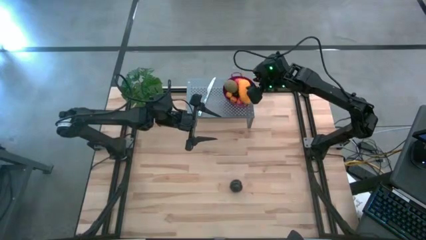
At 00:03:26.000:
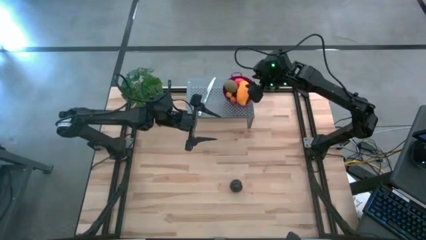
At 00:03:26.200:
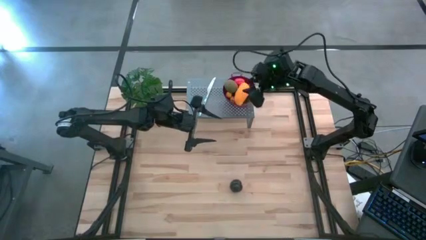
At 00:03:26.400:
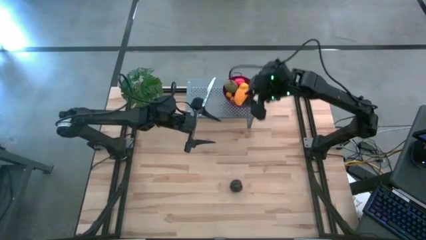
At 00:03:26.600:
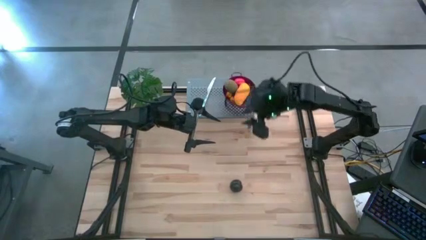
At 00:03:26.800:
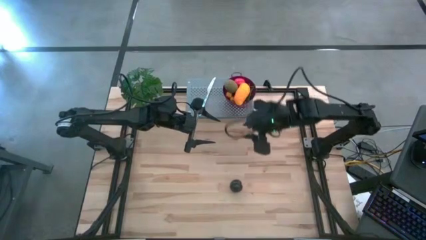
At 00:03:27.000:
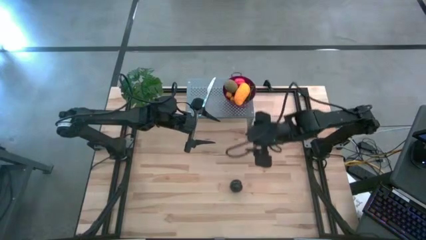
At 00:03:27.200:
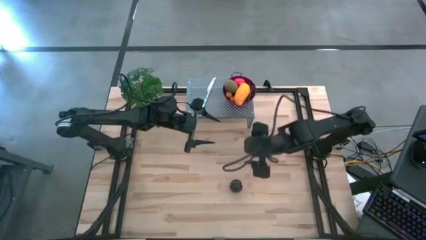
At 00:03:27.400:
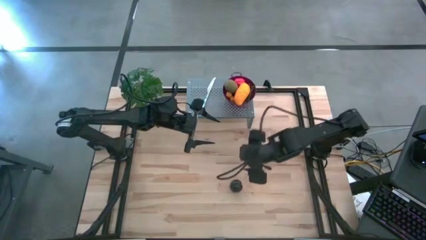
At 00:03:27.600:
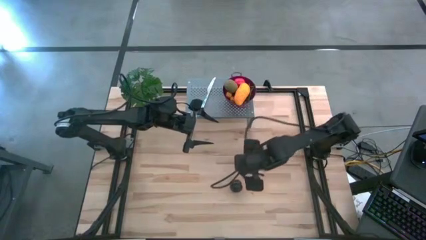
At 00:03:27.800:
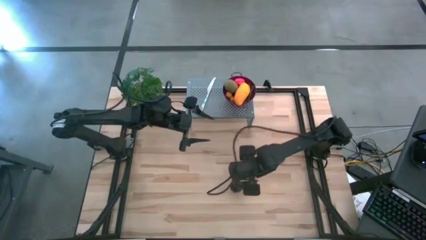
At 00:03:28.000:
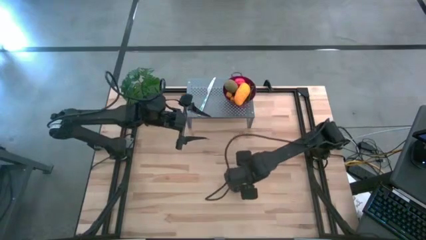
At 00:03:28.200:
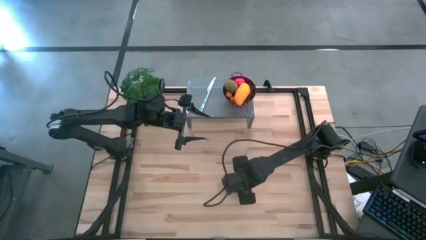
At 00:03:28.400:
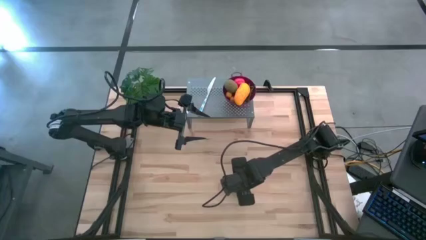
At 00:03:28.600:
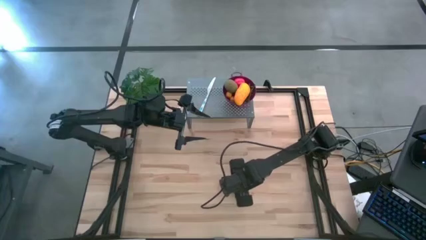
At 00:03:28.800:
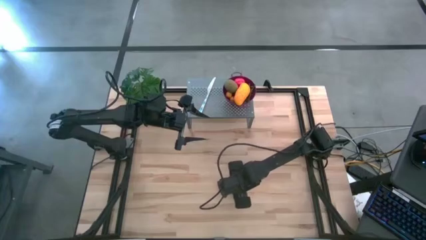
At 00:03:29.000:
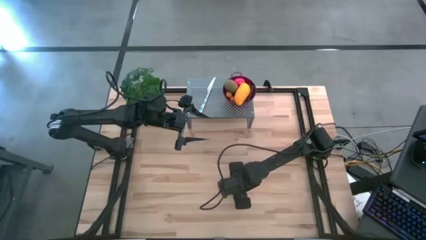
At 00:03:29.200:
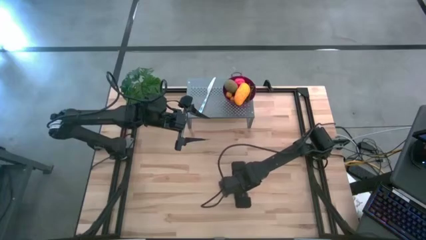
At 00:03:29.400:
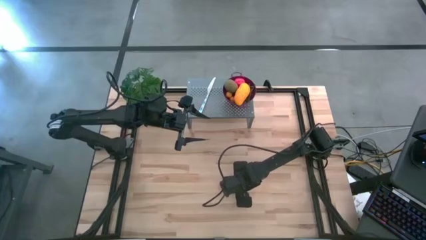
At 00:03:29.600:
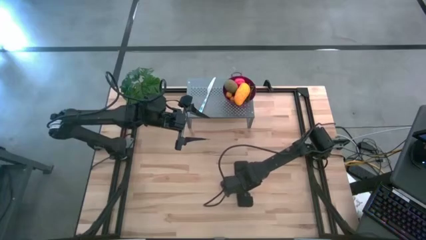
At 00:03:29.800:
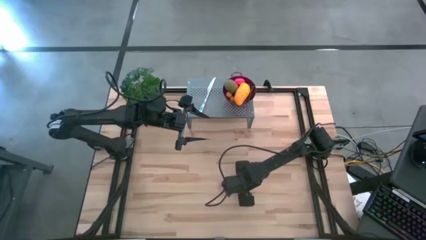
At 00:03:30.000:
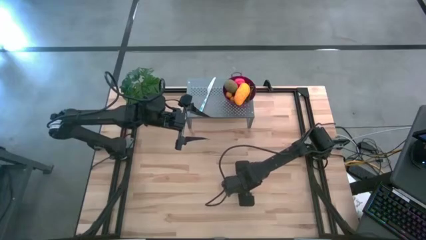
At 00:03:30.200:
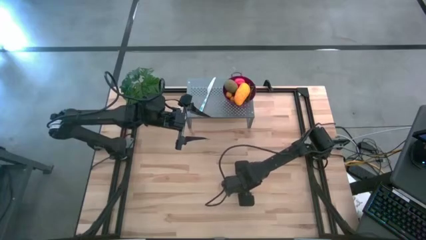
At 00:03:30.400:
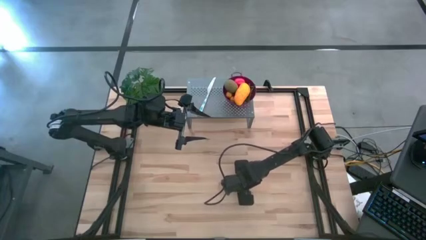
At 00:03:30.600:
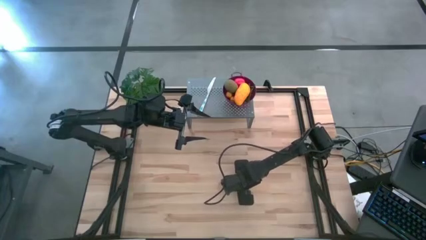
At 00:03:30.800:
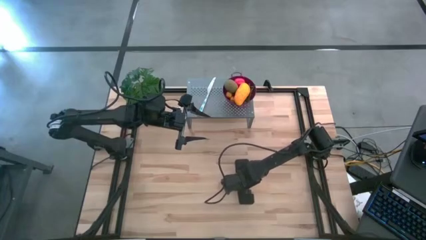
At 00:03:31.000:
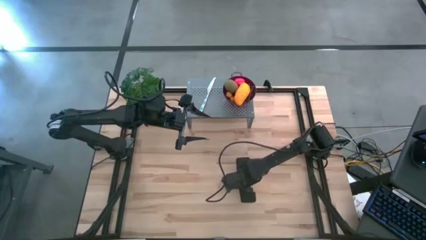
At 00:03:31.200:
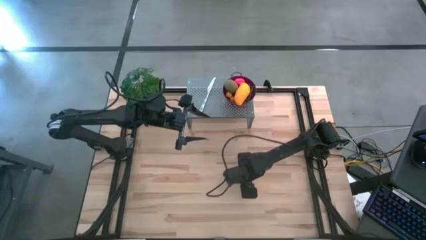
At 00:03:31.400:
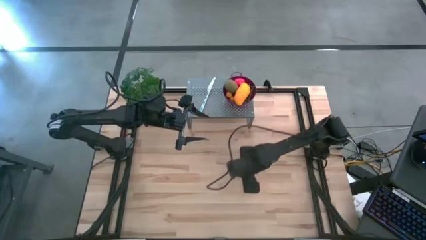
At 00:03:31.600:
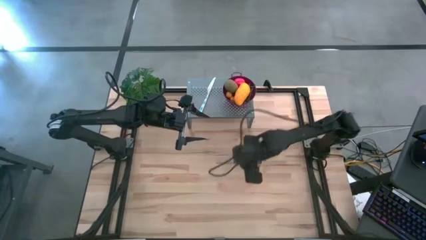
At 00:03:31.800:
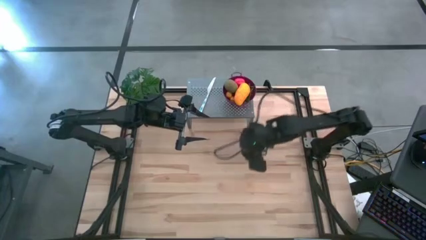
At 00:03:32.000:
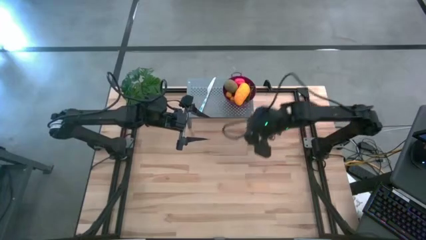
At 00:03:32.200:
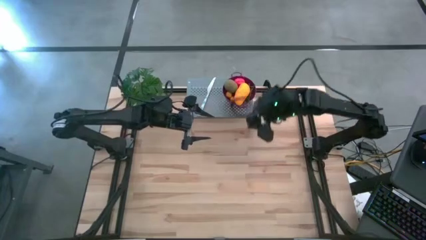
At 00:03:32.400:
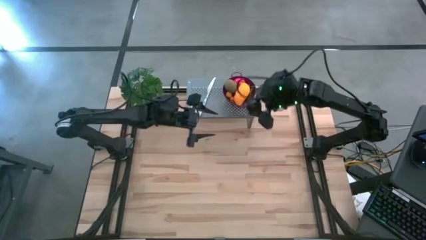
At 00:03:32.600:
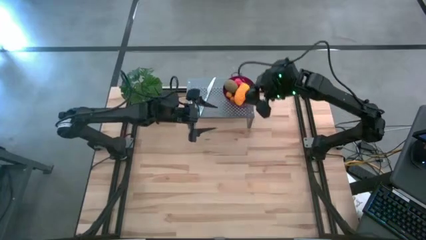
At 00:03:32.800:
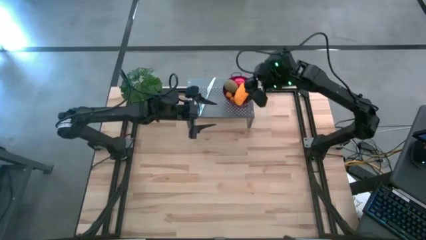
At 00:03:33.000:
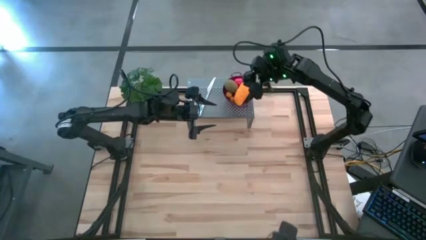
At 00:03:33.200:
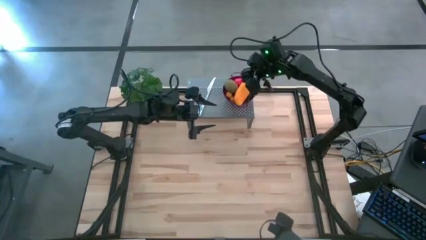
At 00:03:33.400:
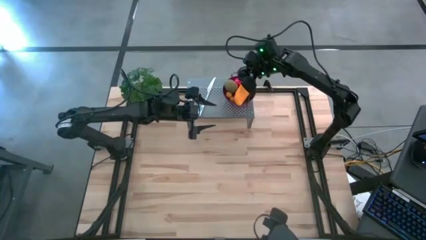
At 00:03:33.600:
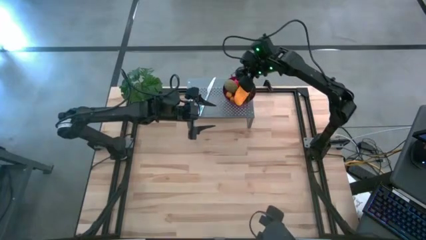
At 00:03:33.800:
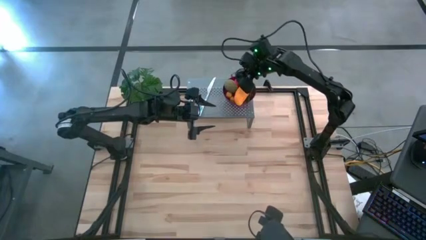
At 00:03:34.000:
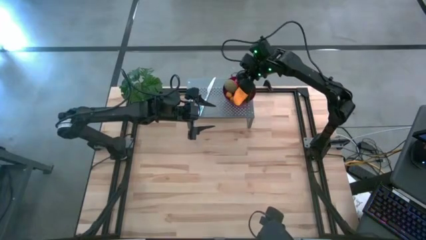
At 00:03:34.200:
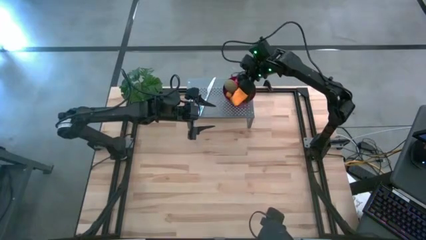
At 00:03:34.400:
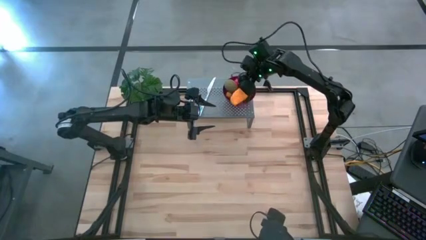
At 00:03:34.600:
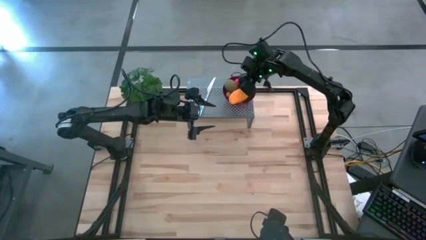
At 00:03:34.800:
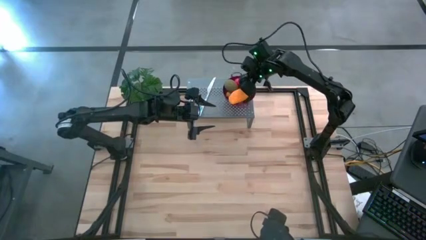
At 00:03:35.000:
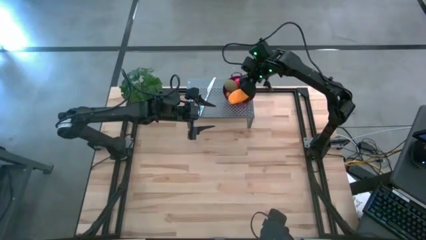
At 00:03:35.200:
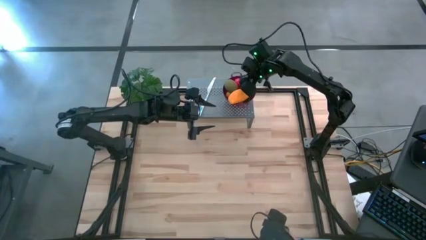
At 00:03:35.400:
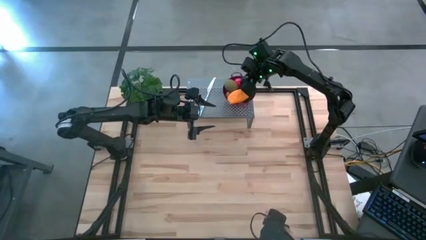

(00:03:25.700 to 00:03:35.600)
Task: Pick & Place Fruit
Put the black plum into the violet strainer bowl on the shelf

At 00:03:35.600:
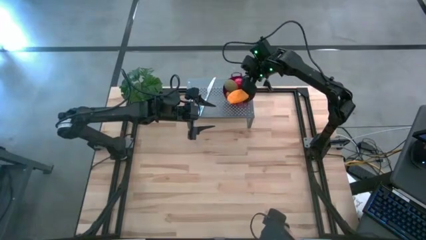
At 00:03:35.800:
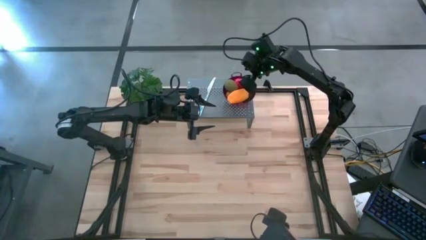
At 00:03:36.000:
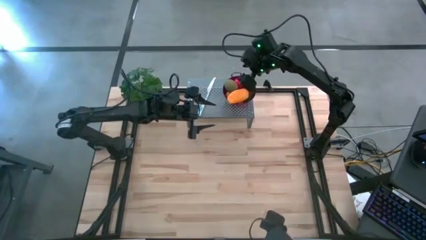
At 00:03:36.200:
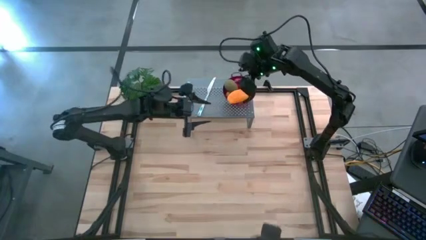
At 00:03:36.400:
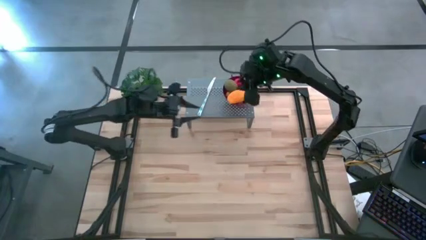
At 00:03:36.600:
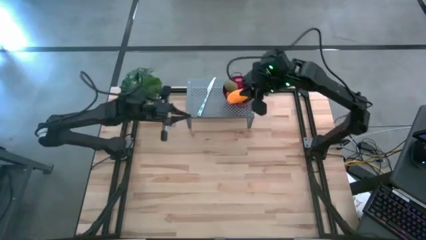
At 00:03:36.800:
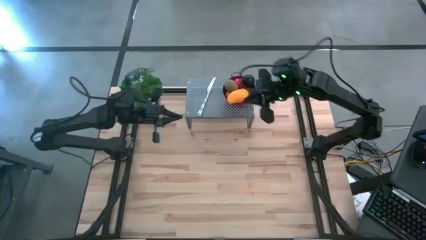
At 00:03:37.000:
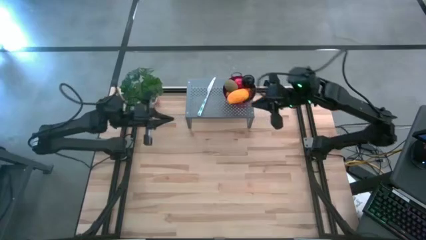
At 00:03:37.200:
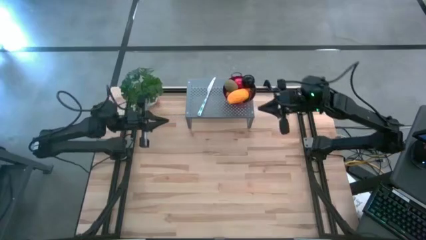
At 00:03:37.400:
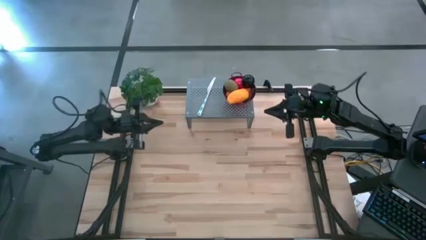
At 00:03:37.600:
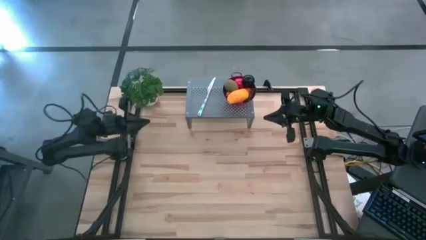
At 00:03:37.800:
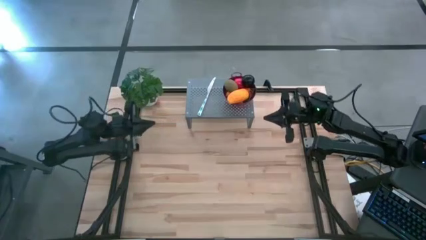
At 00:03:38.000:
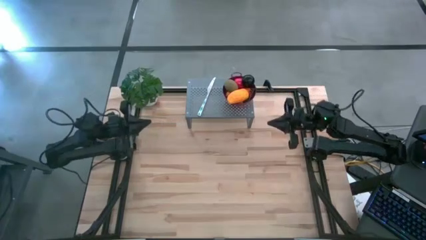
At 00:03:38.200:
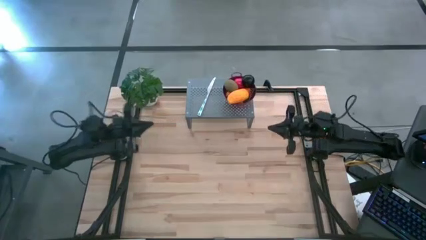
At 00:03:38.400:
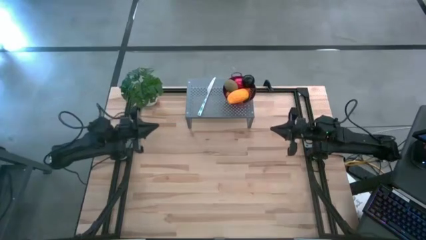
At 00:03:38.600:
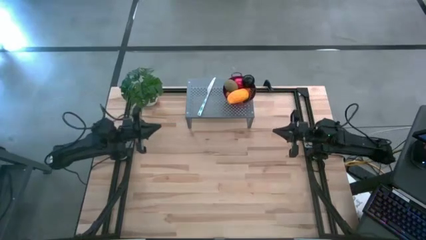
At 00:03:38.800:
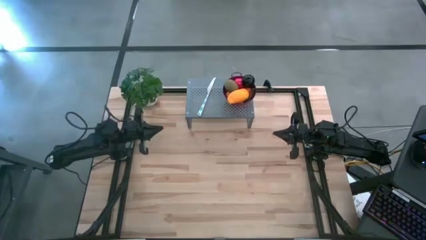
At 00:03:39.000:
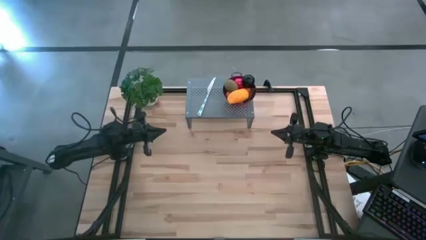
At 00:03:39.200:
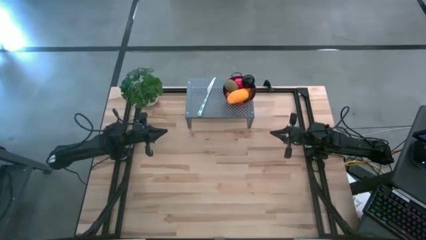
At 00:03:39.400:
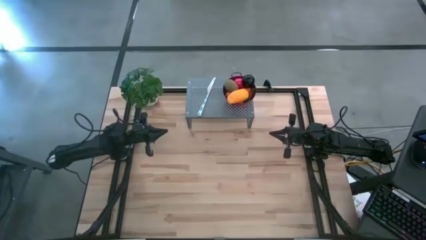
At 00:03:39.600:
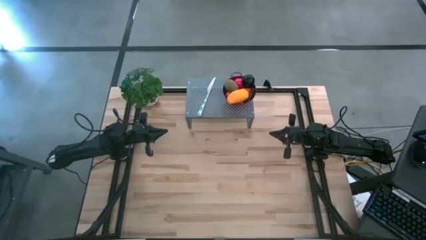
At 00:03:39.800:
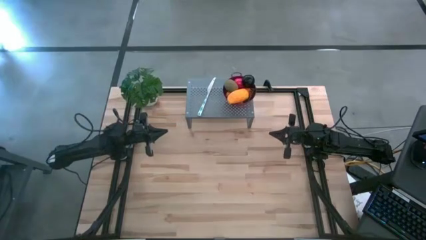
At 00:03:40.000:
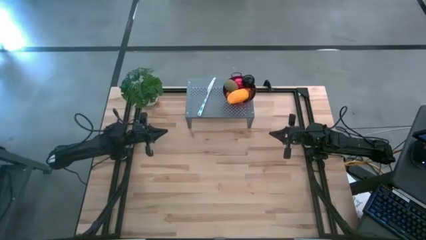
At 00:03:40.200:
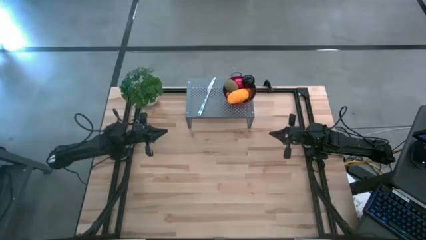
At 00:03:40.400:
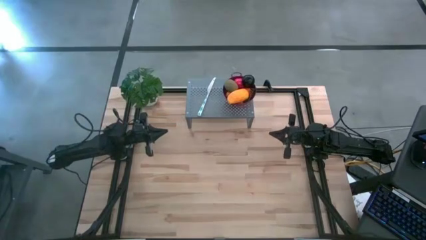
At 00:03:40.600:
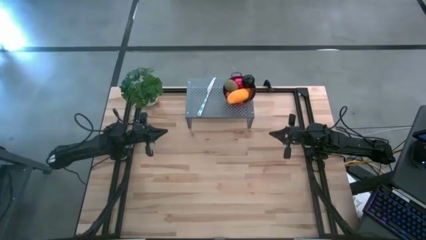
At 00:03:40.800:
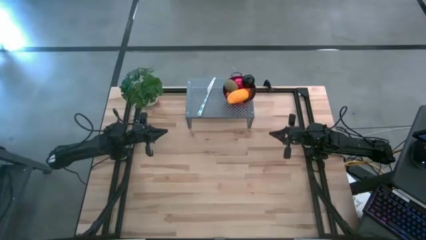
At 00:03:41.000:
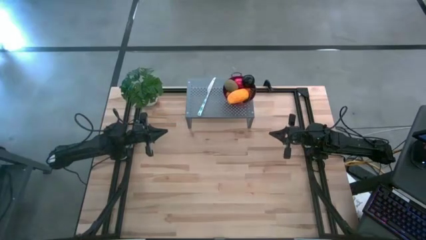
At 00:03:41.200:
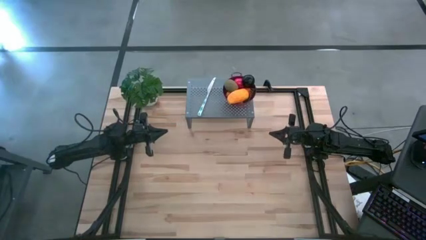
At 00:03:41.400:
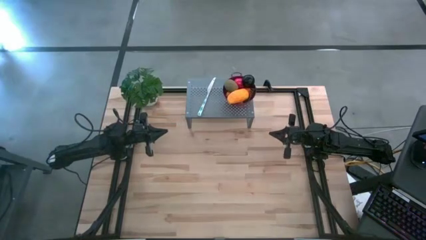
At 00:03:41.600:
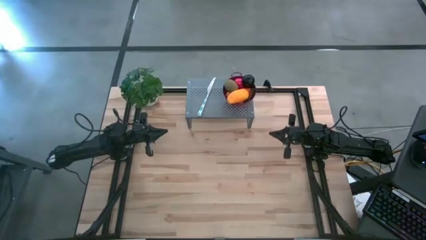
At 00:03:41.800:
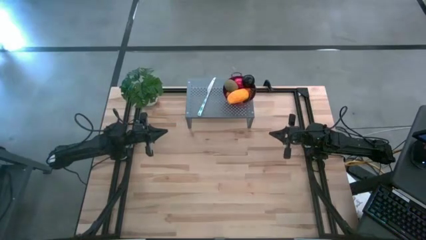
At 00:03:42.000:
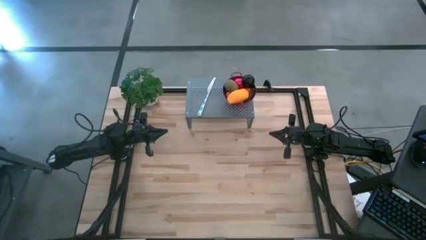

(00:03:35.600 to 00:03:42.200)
Return to Home Position
